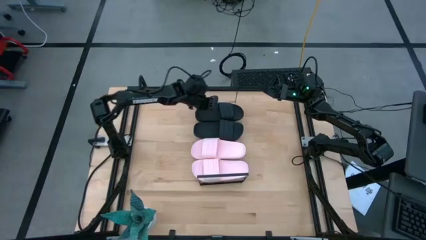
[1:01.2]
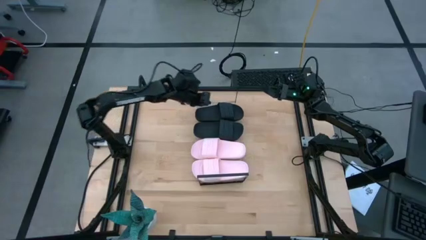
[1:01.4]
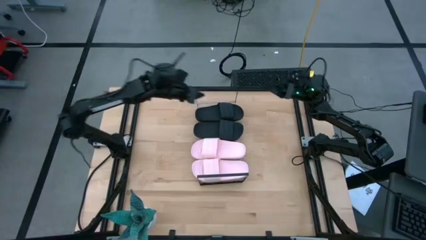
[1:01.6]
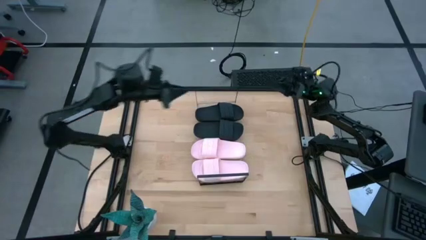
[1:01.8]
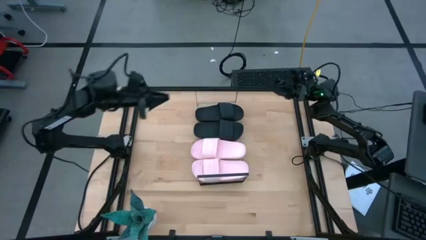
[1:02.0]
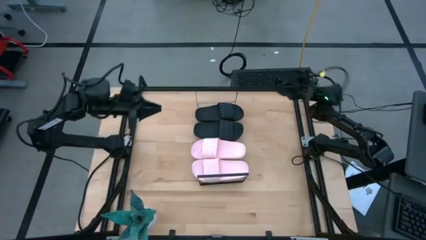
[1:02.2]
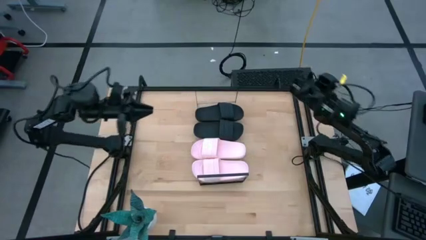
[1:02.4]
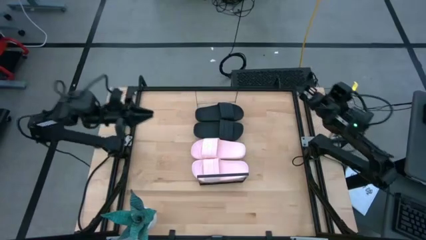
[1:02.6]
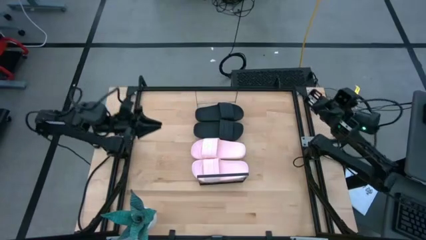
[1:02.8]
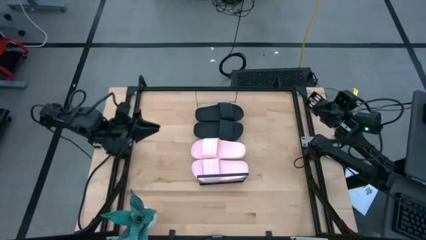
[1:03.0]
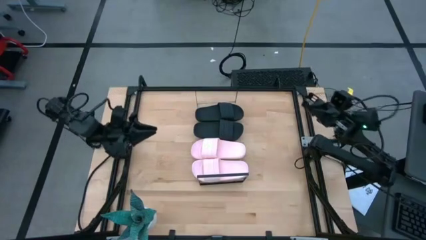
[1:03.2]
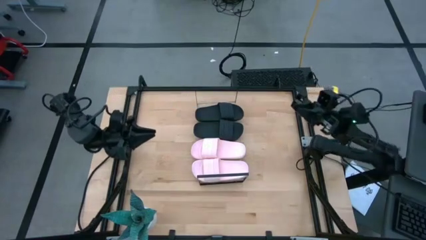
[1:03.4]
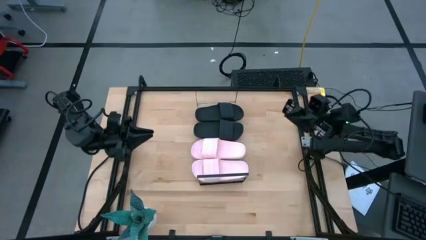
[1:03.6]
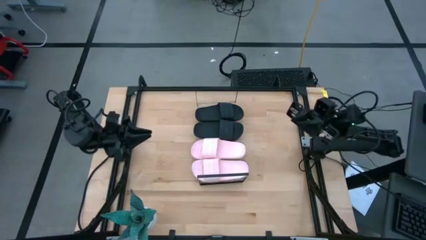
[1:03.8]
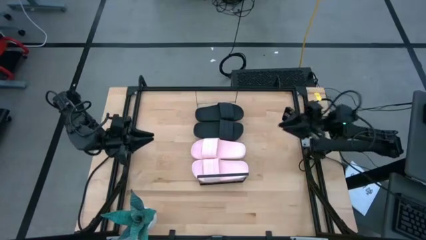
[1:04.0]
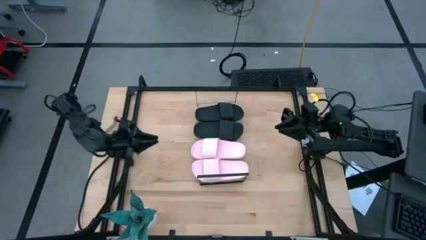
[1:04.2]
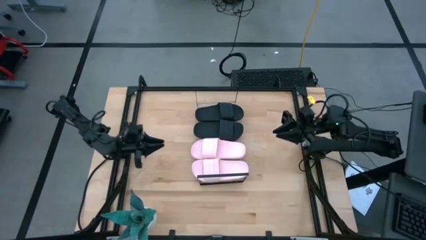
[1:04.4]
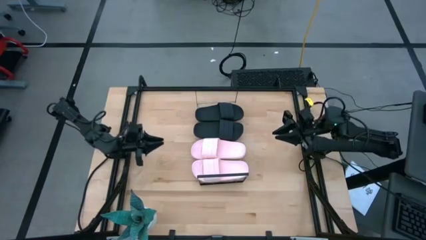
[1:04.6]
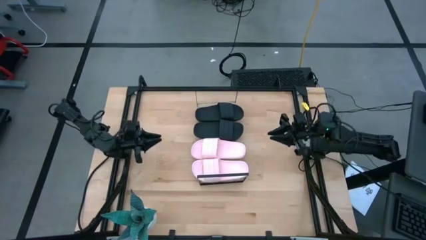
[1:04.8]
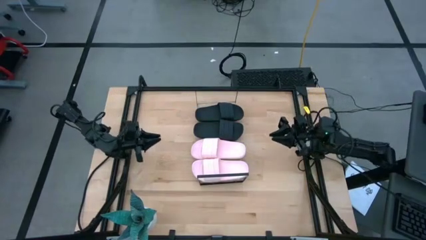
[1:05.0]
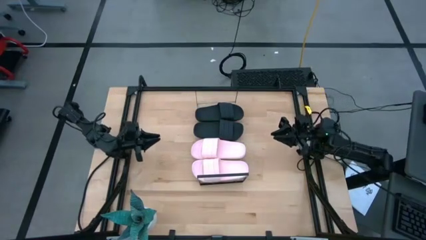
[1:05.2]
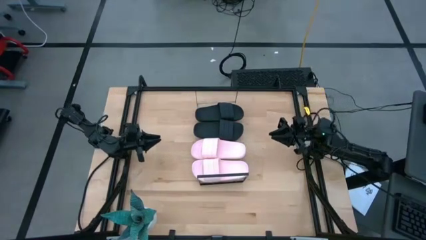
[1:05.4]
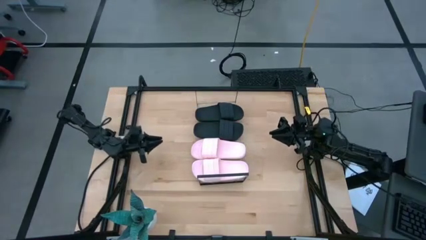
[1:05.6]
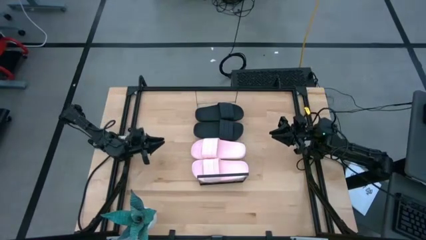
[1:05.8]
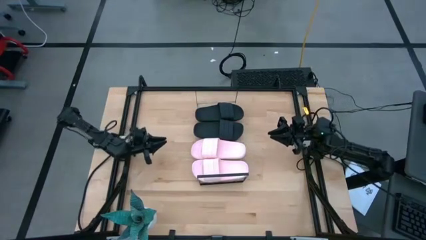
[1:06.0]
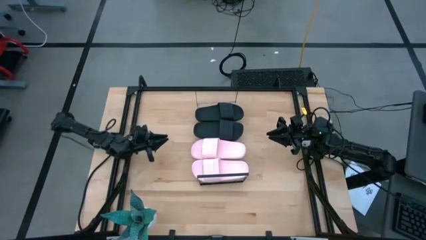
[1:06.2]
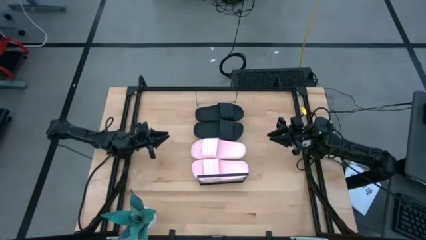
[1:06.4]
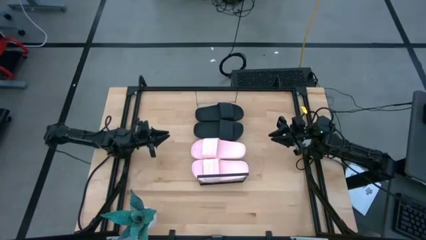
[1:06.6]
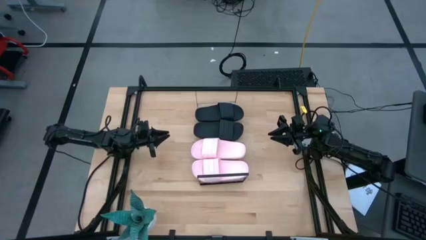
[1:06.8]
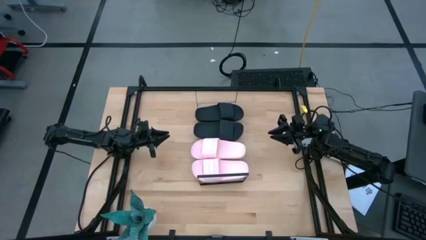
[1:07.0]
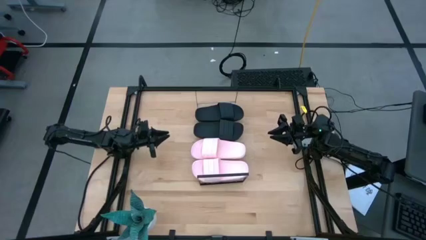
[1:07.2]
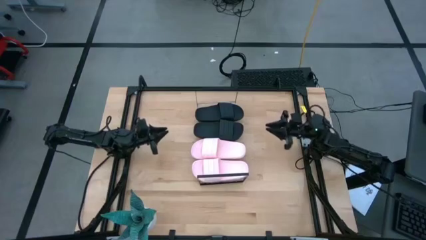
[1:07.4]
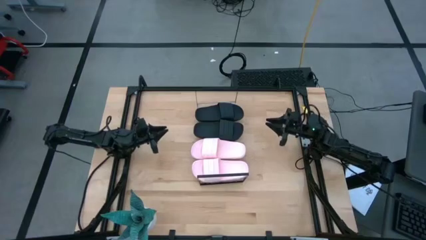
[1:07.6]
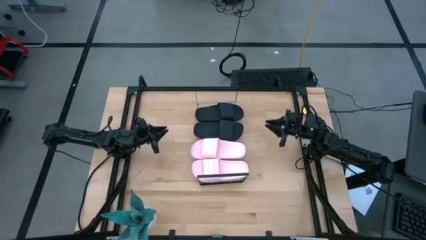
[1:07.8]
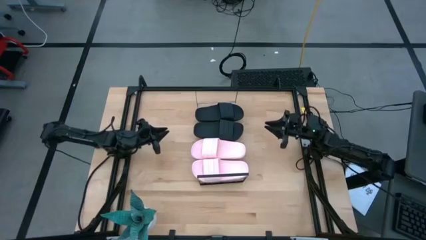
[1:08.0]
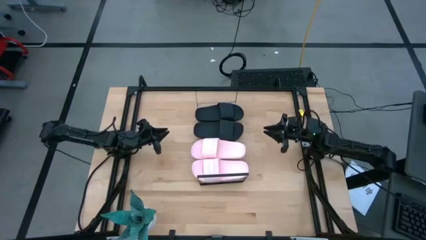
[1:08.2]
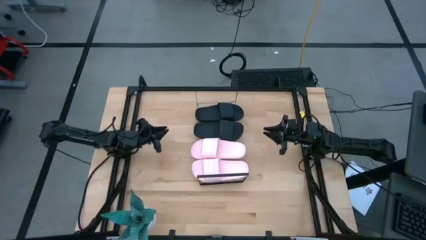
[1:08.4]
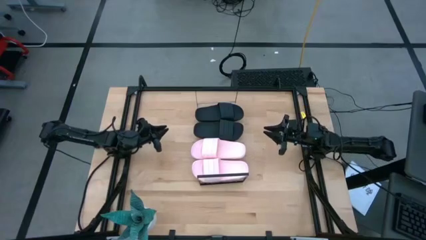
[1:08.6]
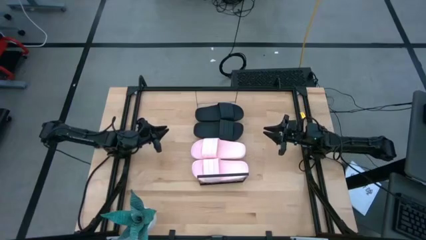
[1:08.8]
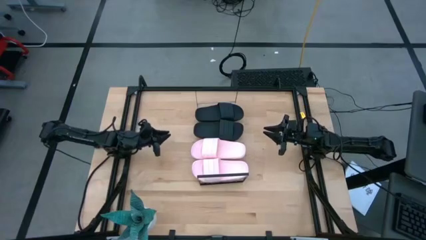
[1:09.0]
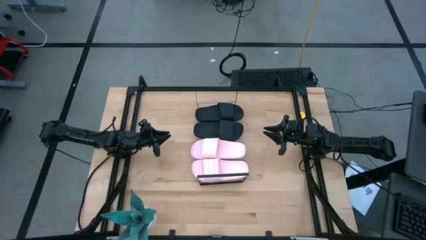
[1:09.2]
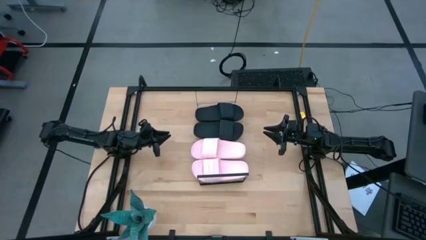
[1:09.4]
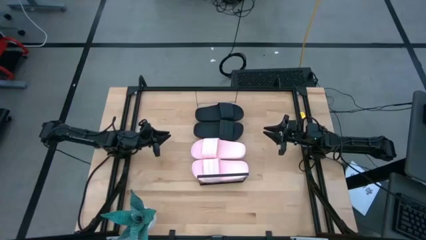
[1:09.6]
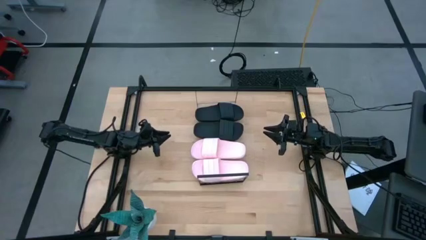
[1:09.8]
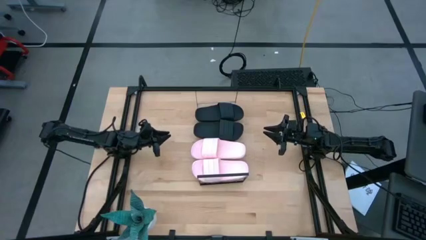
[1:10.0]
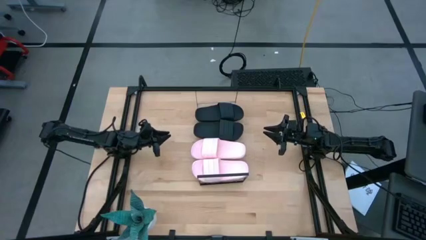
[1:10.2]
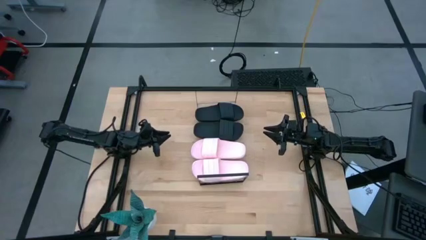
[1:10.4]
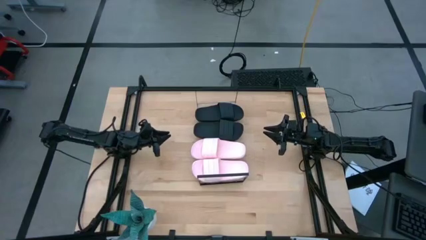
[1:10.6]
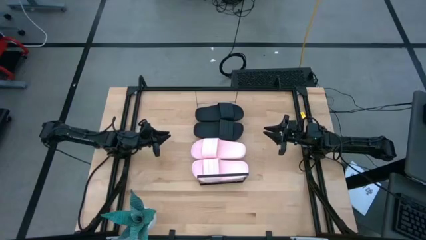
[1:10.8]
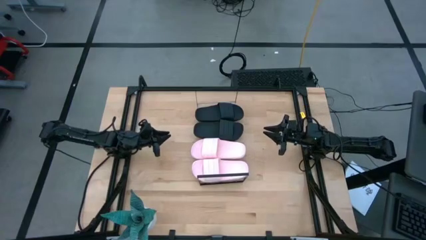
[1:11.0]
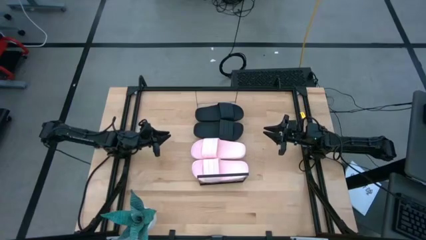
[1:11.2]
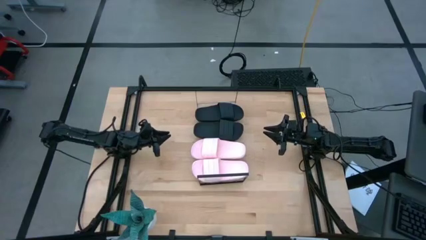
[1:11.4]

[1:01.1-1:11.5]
Task: Pick and place slides into the shelf
Return to Home Position

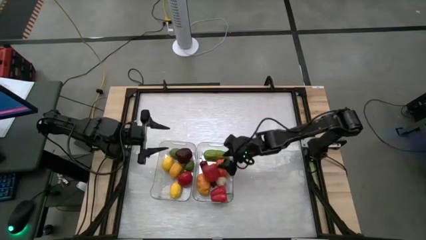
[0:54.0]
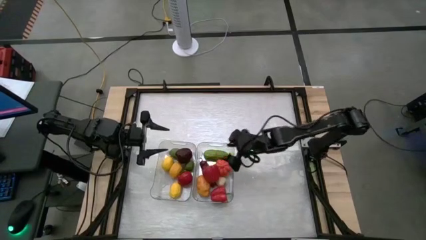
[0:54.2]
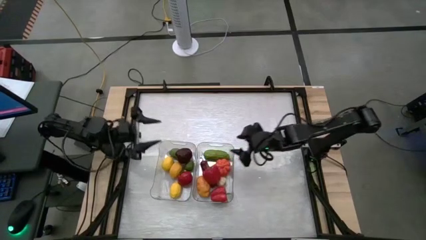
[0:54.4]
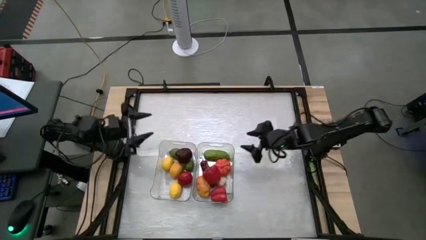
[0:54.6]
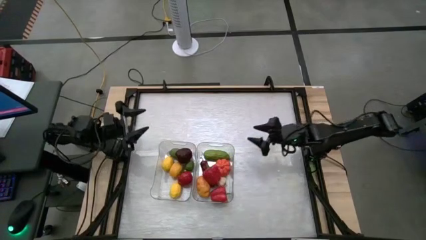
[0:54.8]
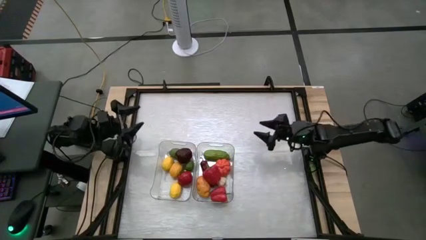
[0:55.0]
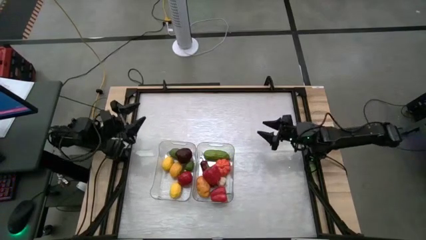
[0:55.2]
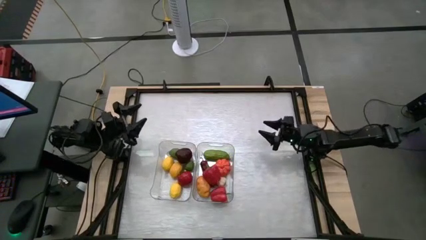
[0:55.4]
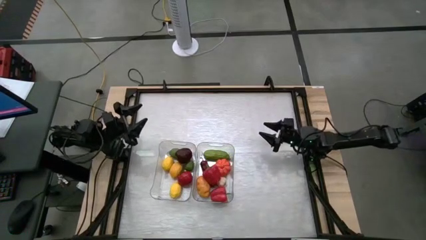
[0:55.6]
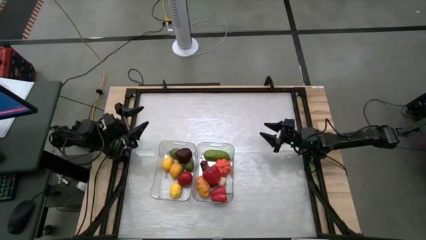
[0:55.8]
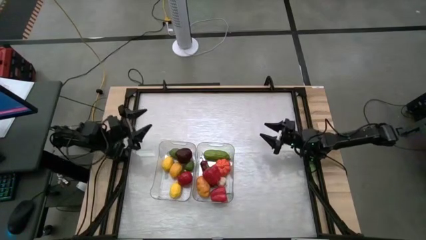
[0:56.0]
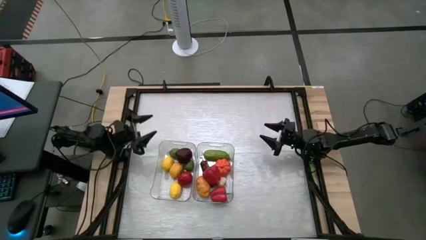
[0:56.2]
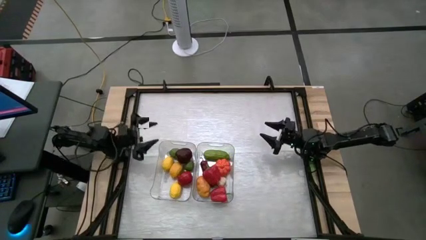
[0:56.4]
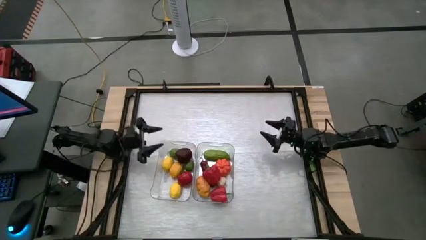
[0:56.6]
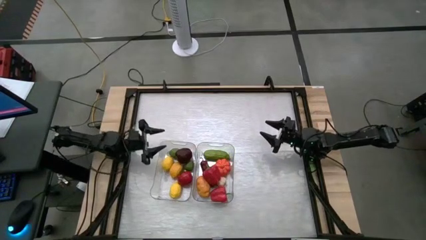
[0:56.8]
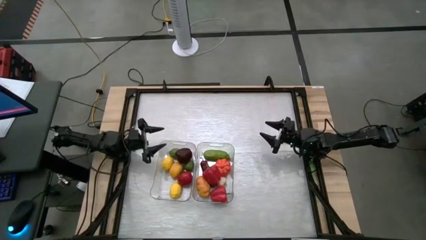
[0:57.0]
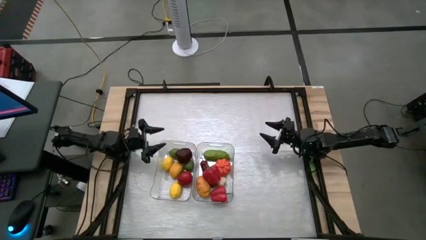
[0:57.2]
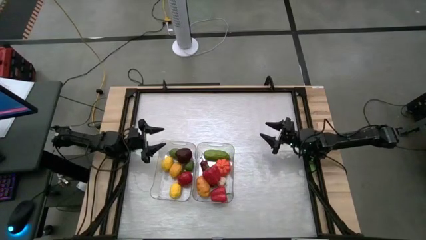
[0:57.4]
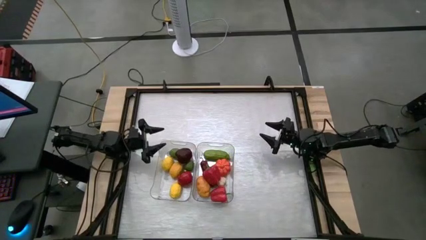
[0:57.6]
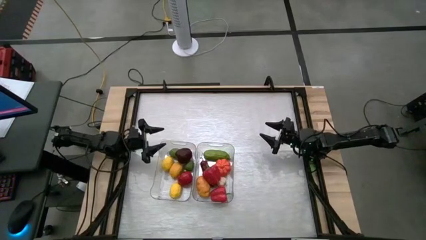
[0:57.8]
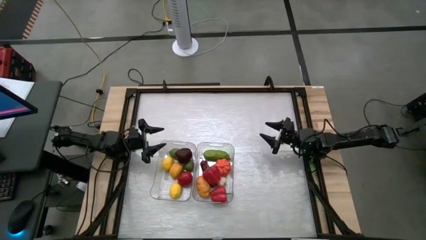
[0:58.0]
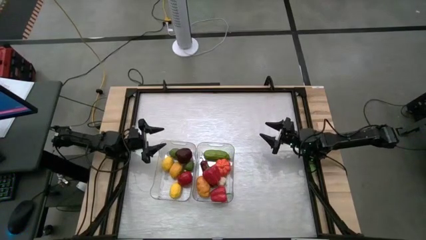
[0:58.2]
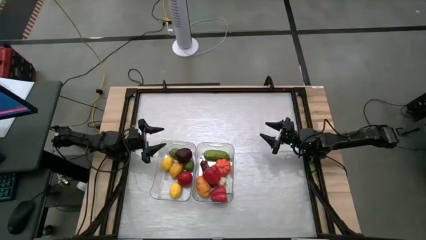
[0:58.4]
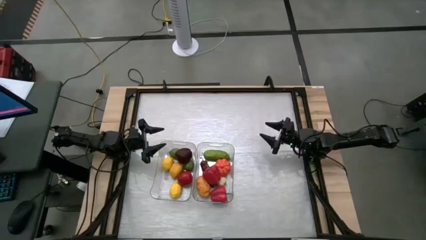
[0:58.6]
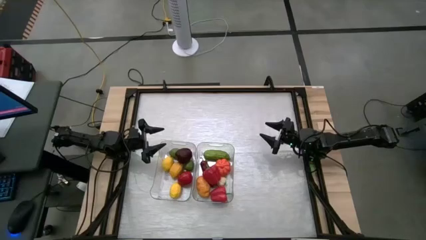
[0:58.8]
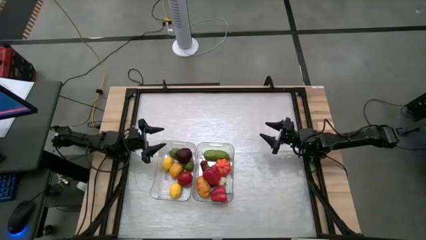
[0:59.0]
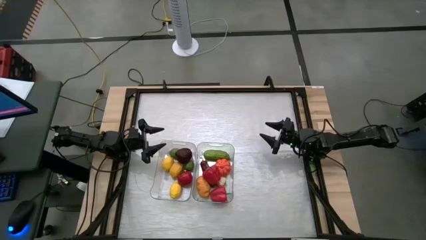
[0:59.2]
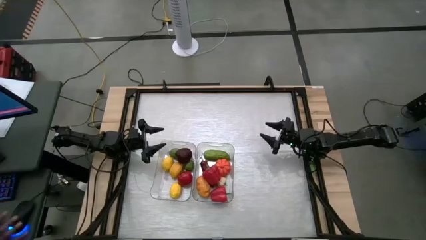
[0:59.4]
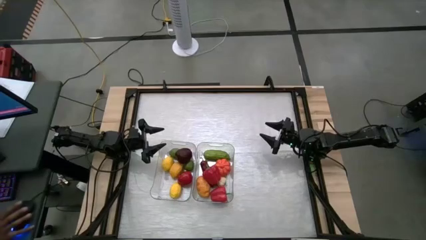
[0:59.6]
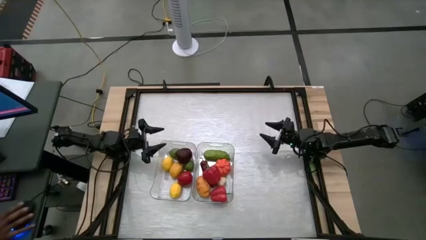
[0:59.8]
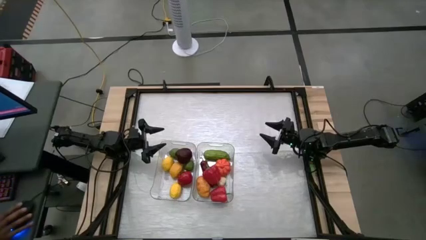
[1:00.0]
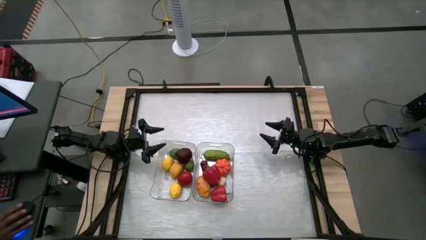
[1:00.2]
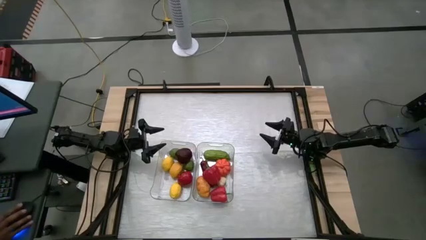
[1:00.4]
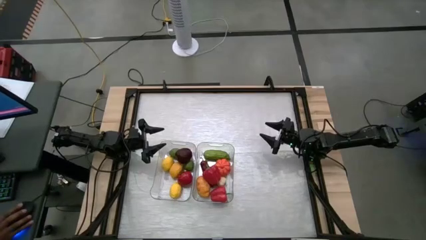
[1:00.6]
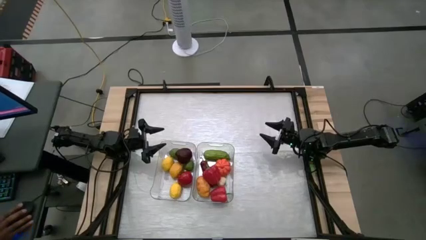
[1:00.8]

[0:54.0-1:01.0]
Task: Sort produce into baskets
Return to Home Position
